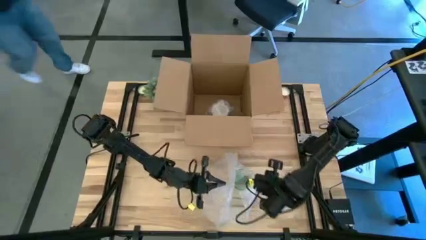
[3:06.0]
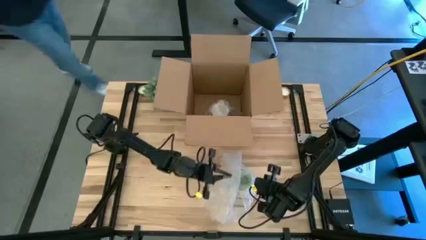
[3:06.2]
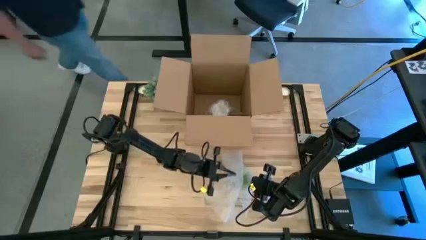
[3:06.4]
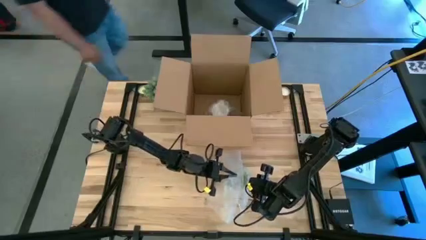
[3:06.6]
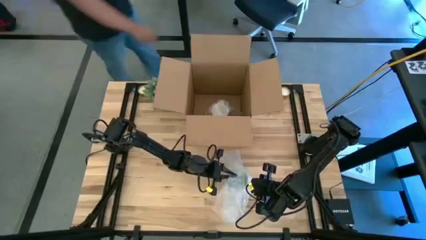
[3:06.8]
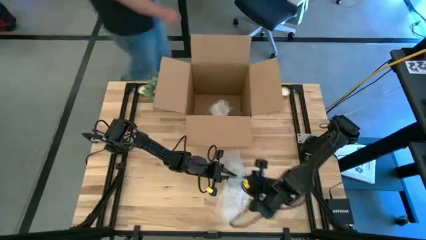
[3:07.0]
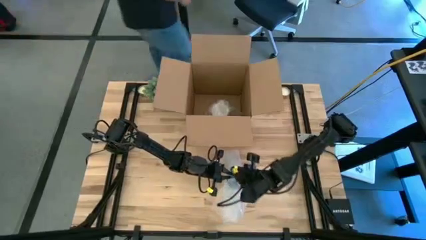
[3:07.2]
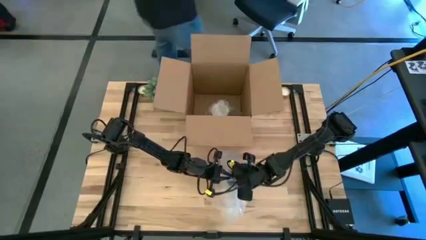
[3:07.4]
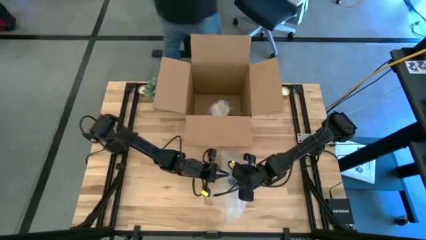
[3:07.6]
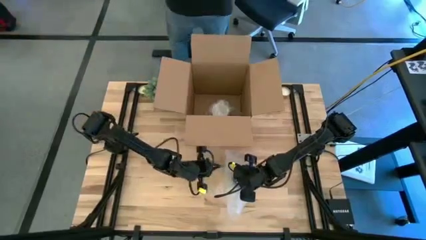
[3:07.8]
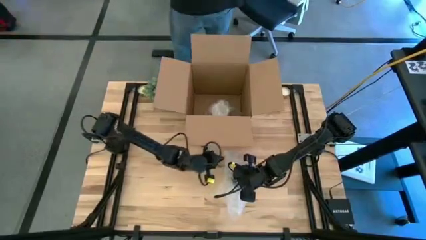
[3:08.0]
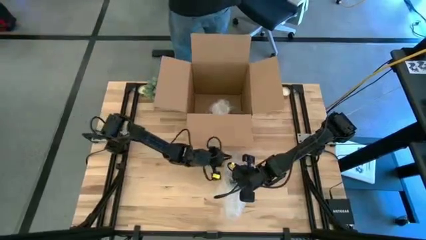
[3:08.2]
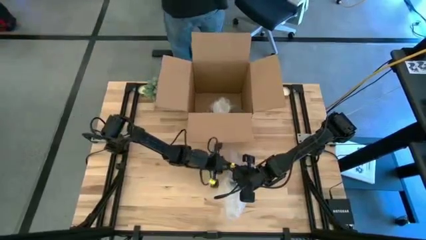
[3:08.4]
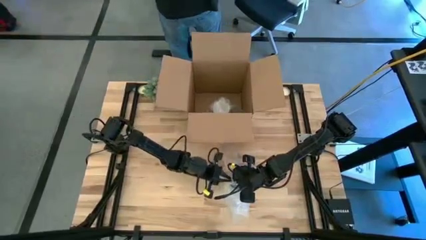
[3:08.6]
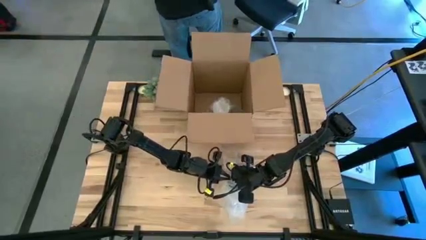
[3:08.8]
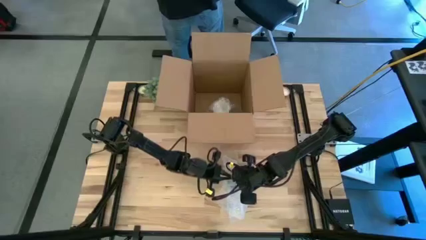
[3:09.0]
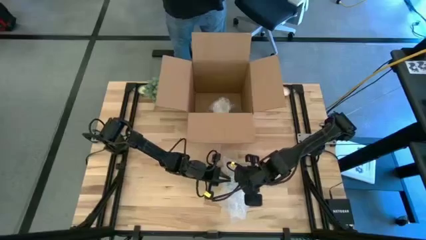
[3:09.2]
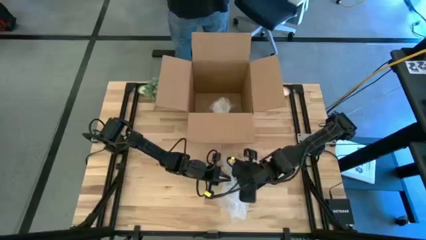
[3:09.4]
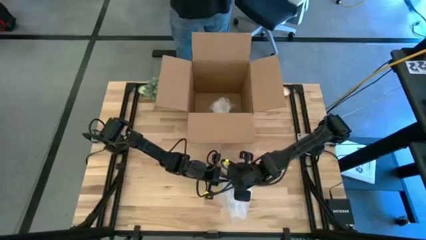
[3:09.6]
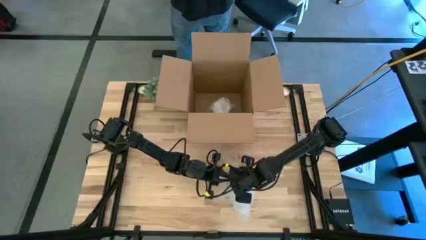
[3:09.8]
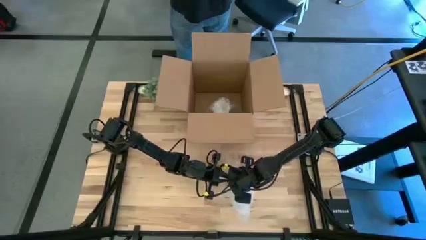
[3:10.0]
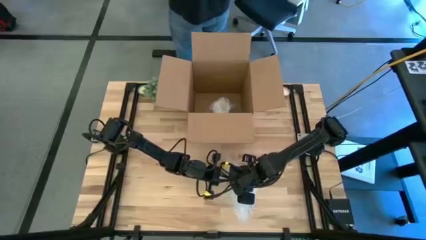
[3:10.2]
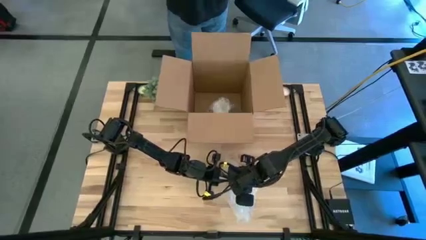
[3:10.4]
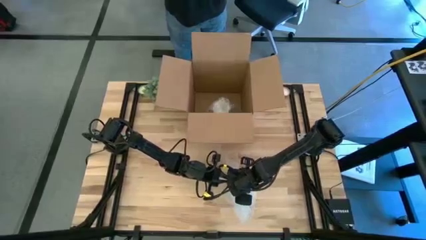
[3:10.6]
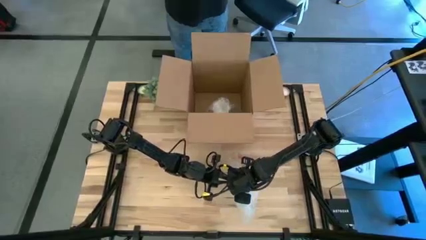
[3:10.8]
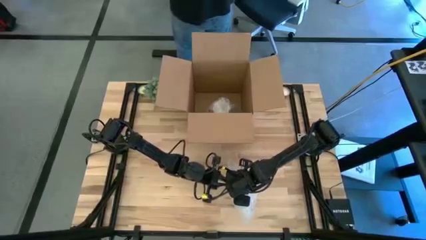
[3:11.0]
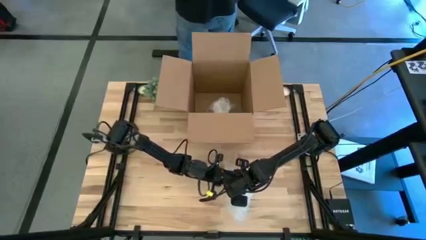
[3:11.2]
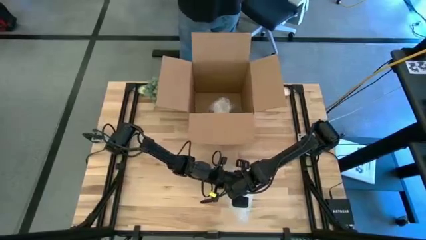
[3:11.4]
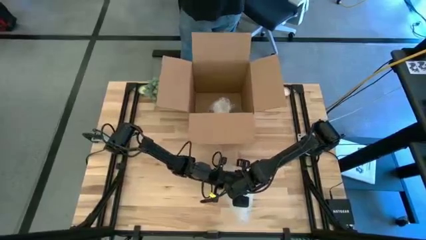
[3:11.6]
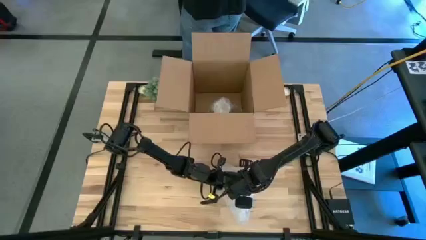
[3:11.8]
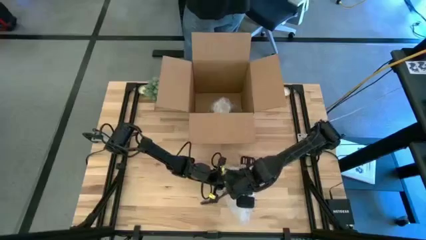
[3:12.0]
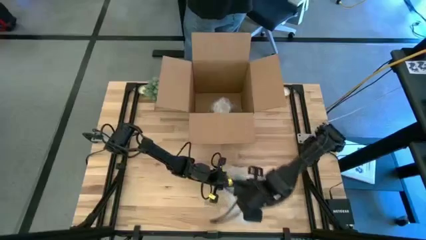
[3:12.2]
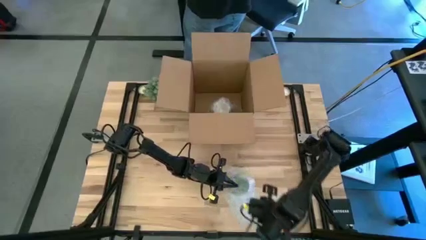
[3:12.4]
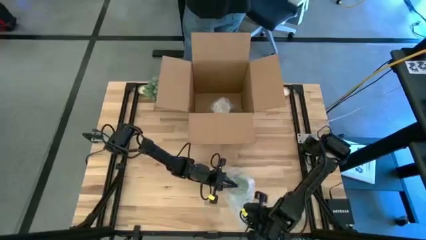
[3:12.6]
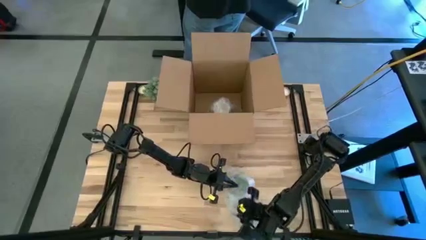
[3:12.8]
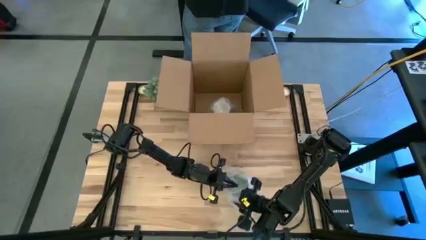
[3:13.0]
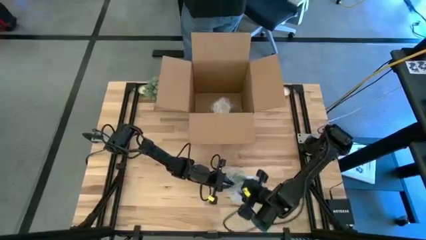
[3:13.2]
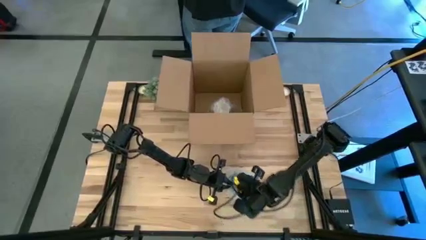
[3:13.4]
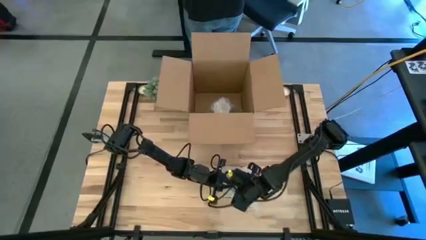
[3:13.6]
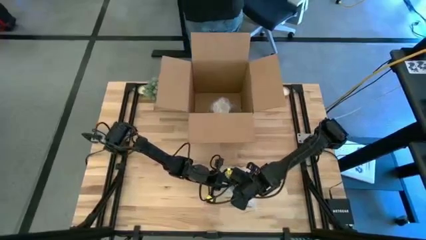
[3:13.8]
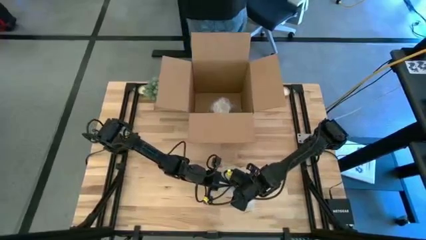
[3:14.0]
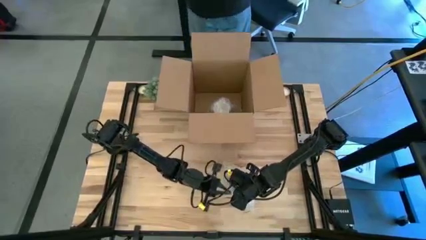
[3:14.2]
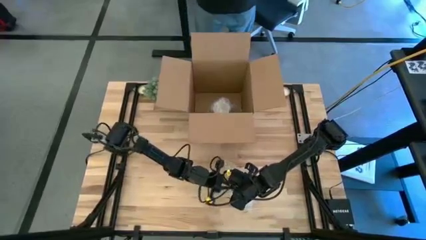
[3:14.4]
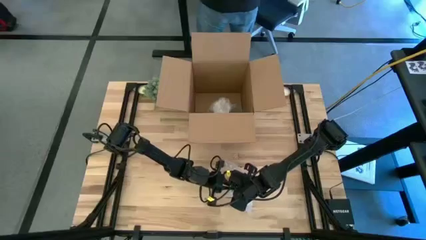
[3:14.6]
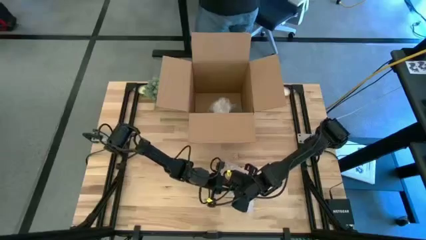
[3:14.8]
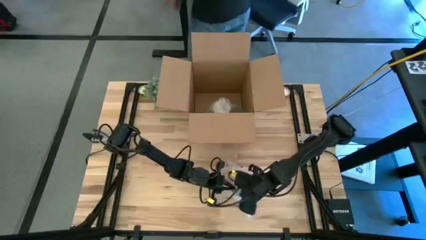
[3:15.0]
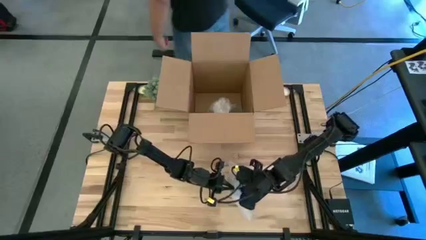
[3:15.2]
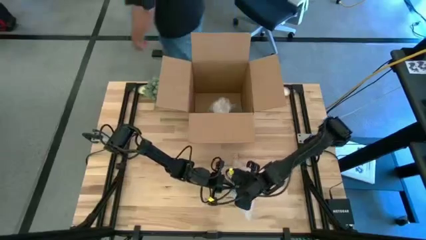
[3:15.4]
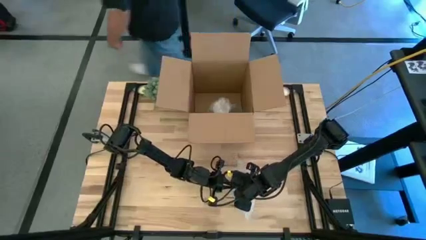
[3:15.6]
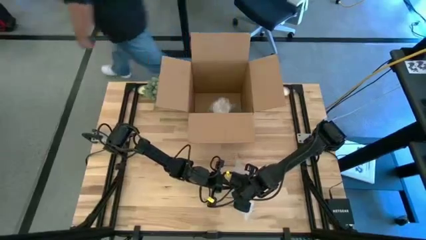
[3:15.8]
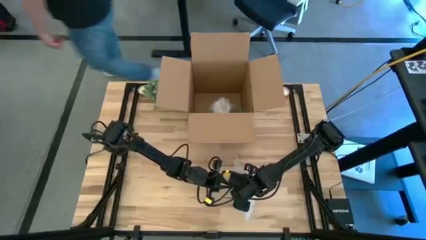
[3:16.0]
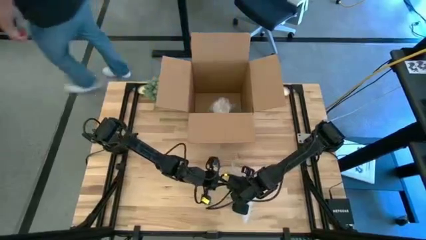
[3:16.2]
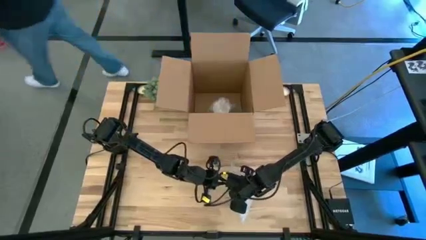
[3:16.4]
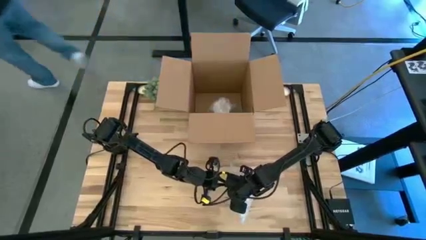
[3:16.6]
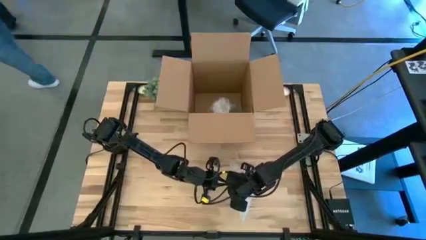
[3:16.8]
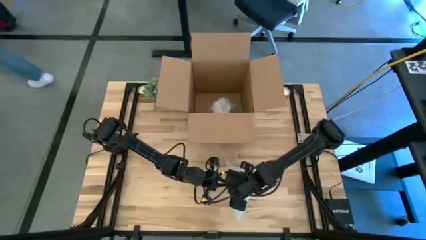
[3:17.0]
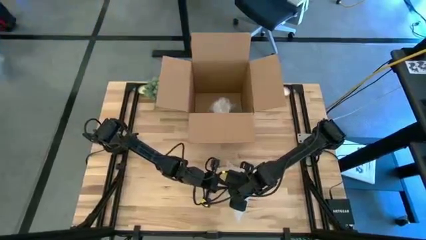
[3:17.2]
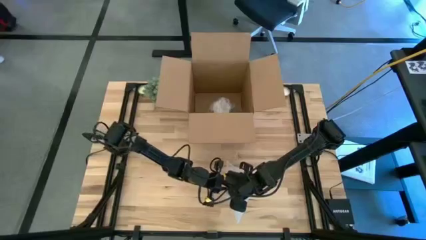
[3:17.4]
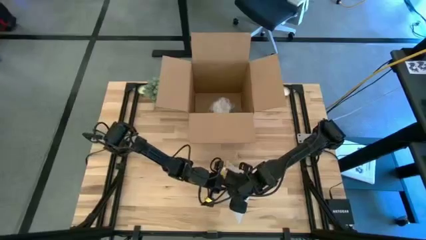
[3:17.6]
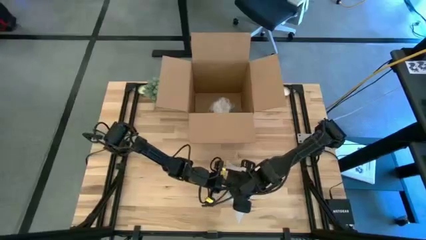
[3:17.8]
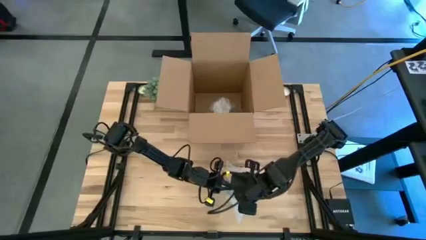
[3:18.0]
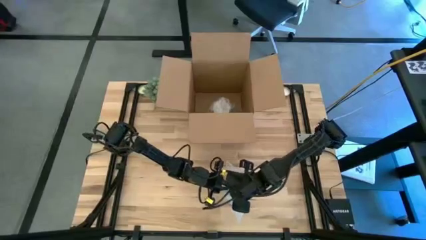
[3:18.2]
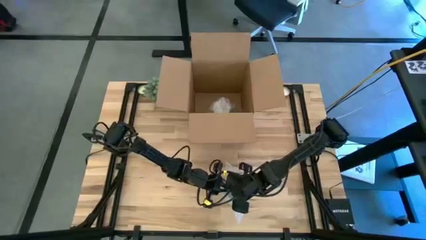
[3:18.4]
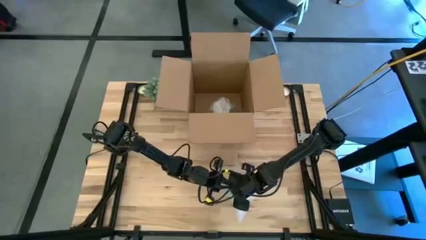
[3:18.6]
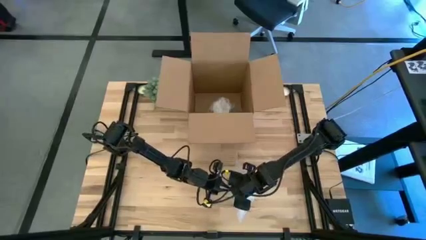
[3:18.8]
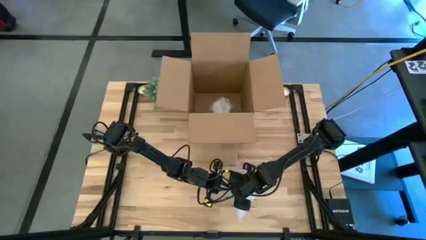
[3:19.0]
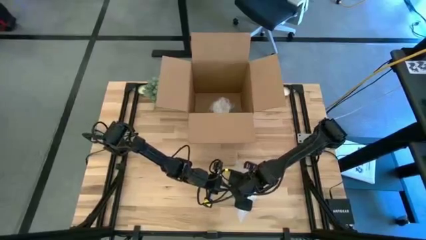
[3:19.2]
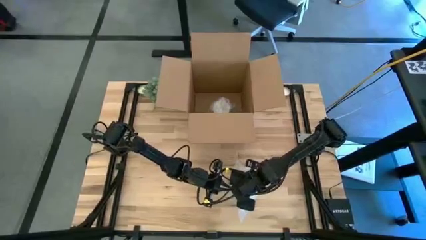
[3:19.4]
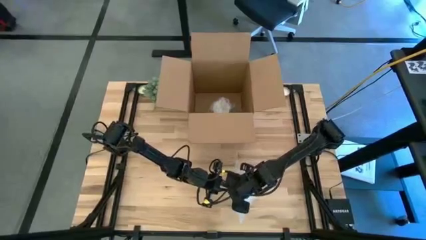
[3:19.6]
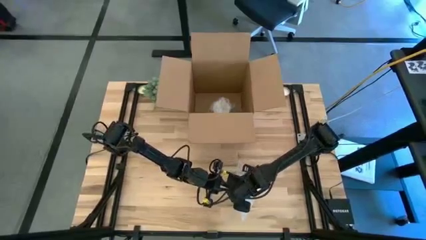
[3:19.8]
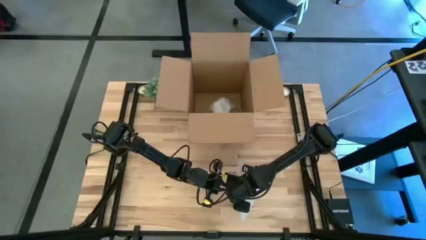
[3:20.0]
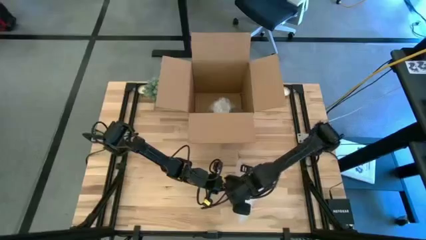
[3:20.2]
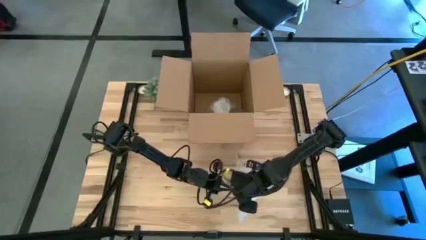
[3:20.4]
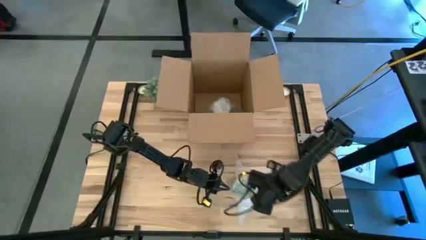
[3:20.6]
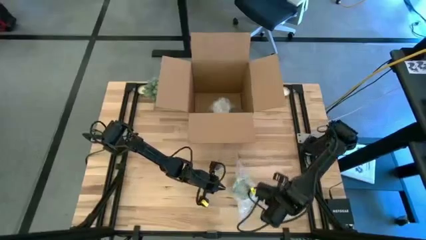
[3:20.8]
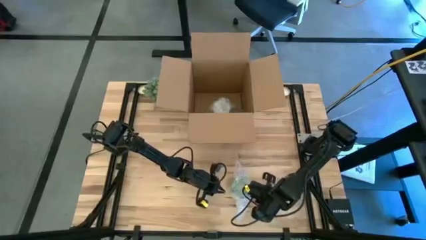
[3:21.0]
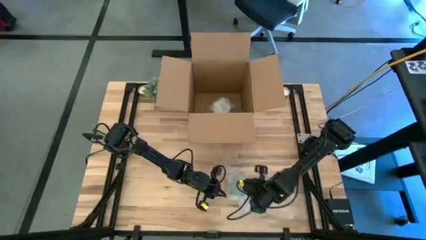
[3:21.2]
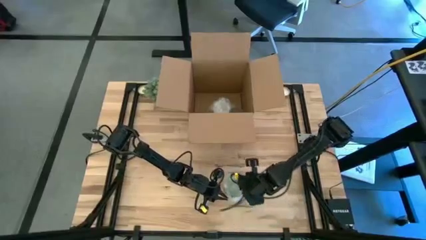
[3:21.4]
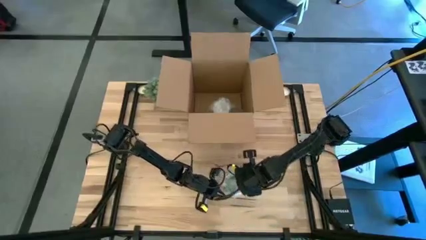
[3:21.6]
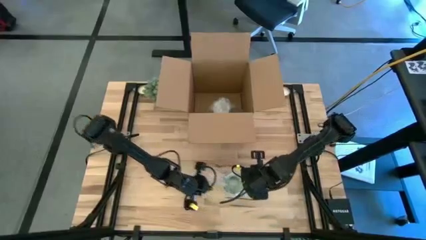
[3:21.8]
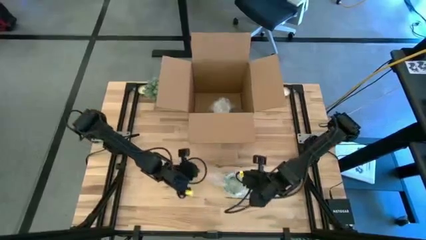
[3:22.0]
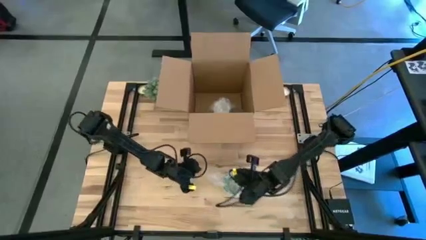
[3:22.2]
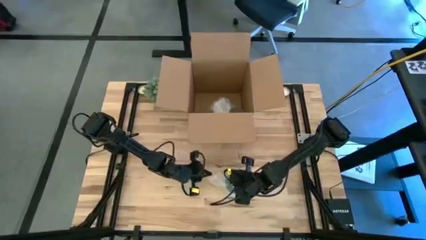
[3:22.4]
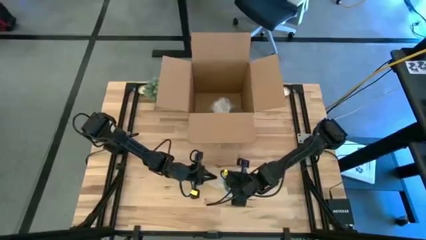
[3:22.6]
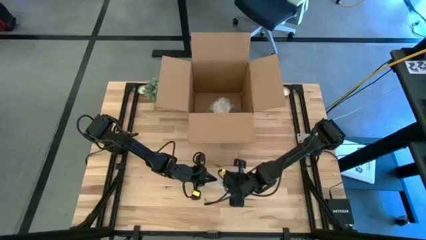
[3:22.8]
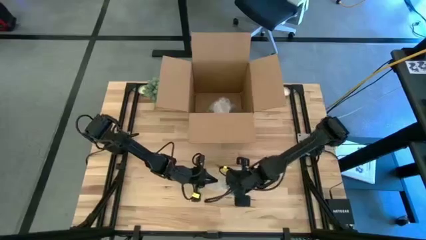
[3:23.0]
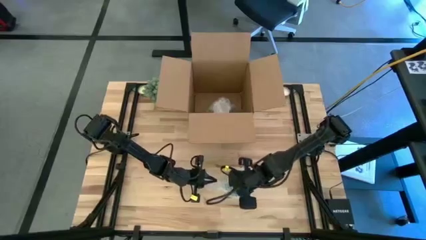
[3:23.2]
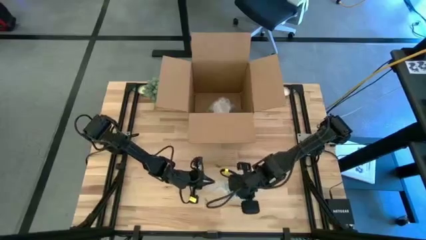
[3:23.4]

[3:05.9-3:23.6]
Task: wrap mug
Wrap the green mug with bubble wrap
